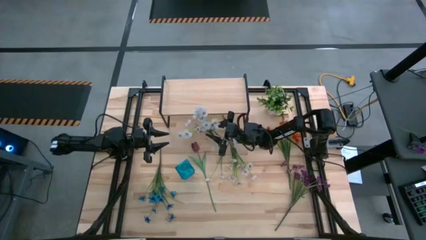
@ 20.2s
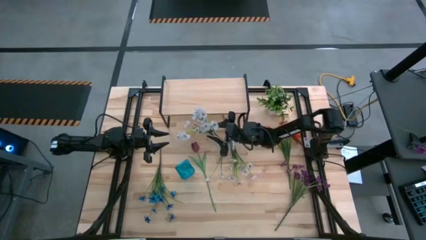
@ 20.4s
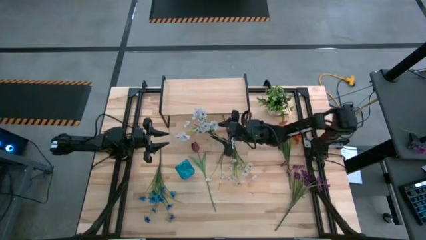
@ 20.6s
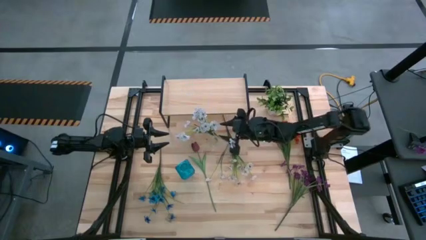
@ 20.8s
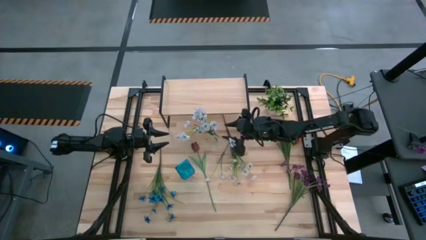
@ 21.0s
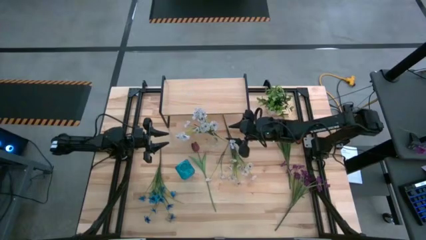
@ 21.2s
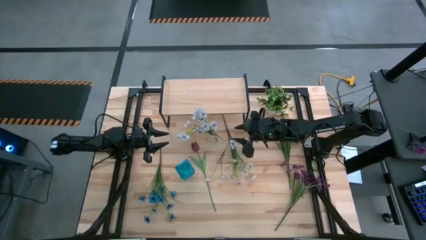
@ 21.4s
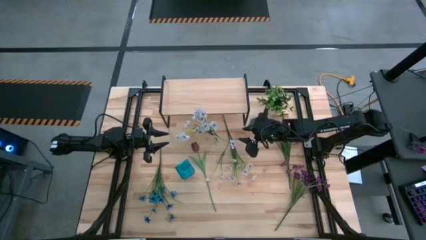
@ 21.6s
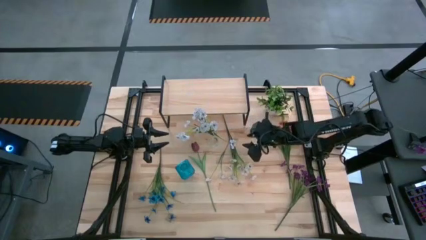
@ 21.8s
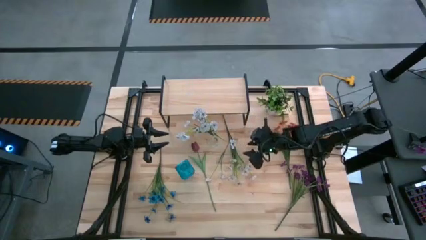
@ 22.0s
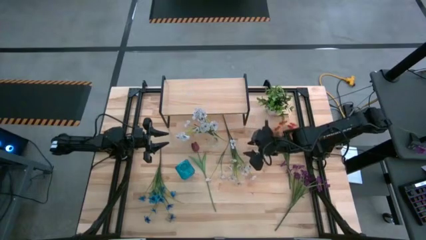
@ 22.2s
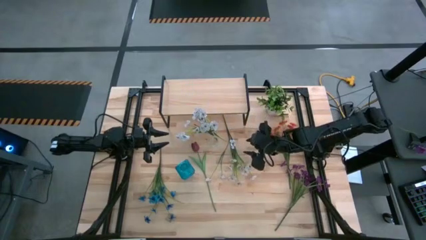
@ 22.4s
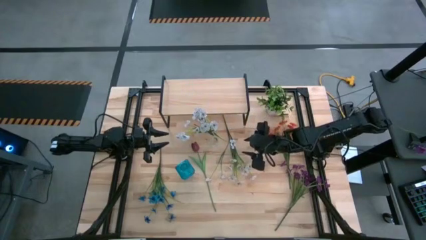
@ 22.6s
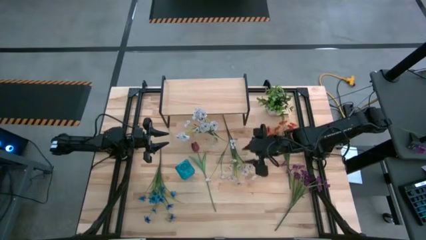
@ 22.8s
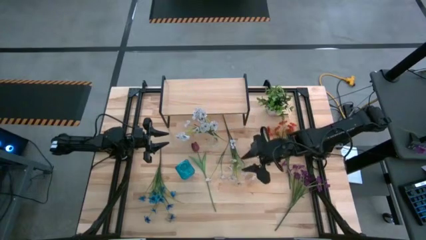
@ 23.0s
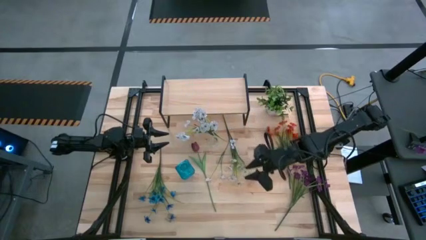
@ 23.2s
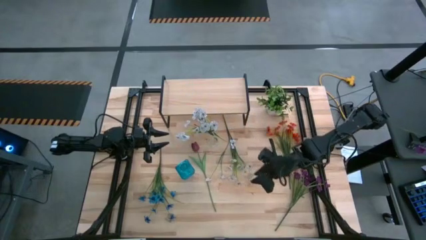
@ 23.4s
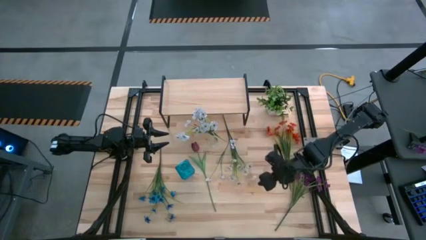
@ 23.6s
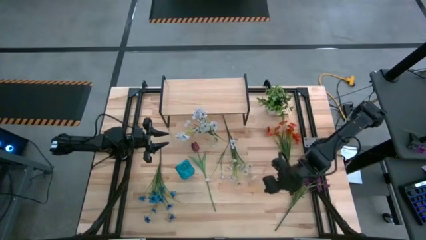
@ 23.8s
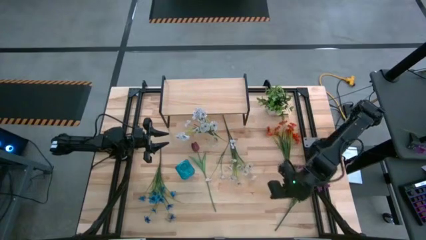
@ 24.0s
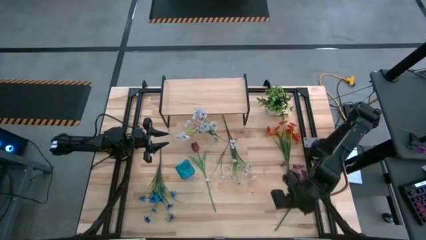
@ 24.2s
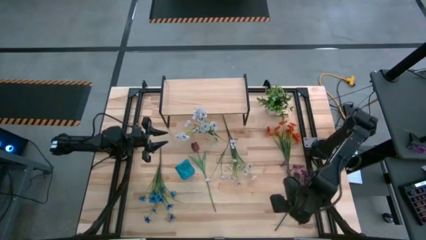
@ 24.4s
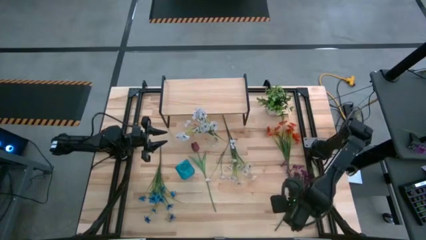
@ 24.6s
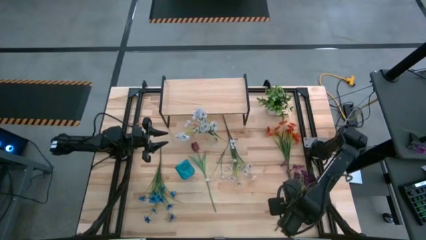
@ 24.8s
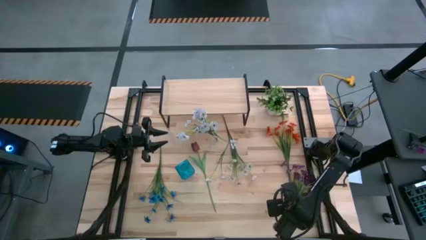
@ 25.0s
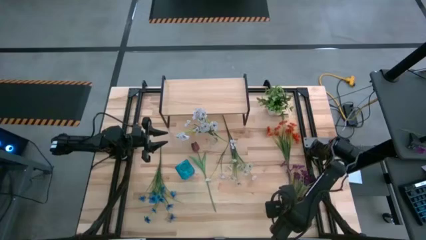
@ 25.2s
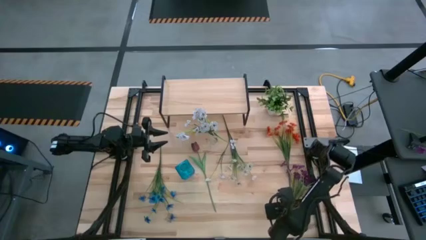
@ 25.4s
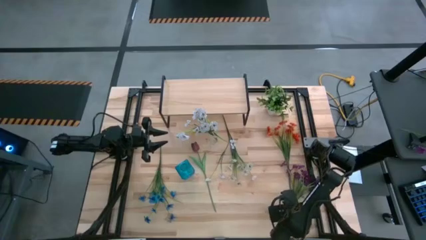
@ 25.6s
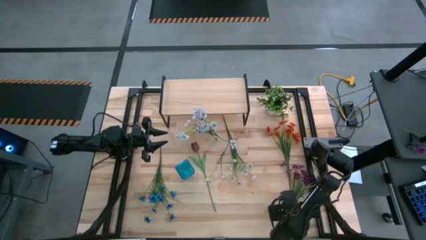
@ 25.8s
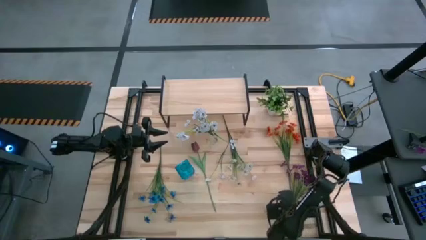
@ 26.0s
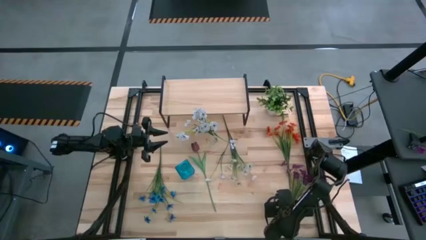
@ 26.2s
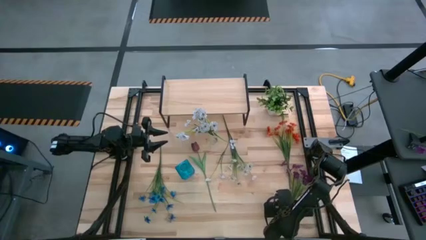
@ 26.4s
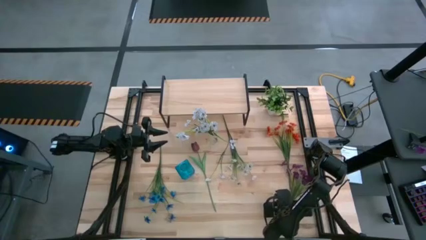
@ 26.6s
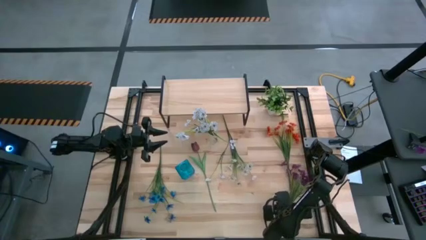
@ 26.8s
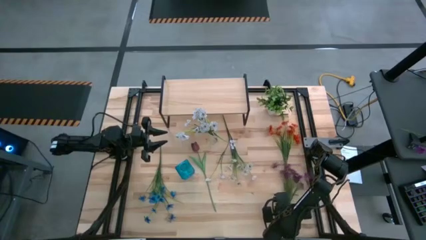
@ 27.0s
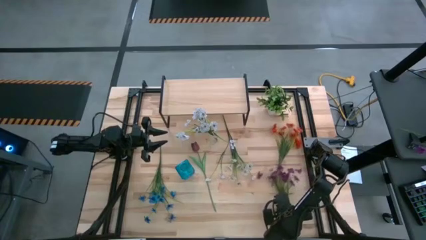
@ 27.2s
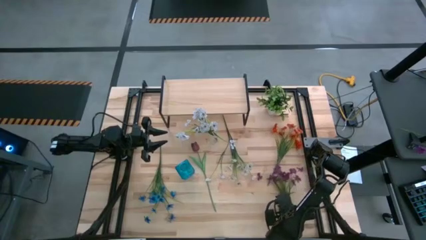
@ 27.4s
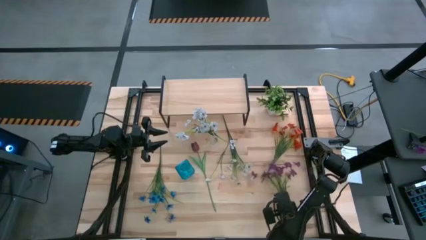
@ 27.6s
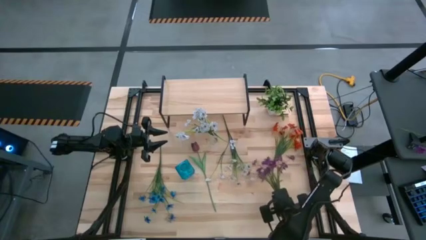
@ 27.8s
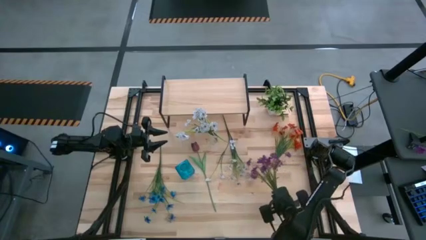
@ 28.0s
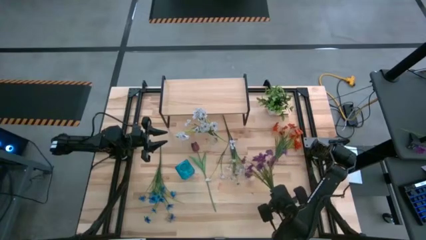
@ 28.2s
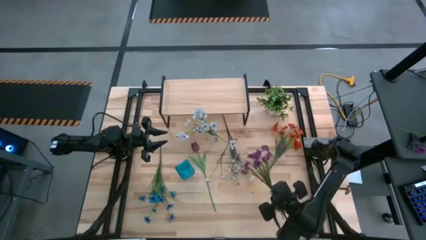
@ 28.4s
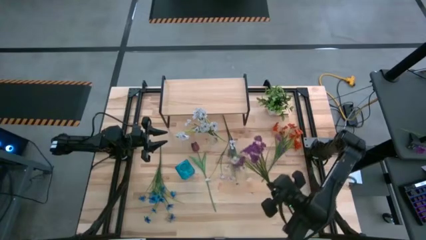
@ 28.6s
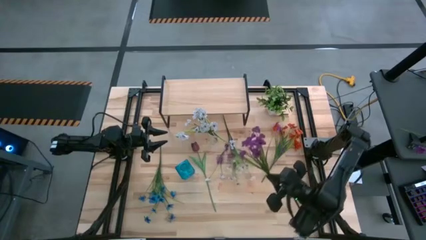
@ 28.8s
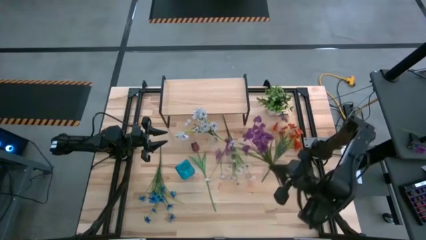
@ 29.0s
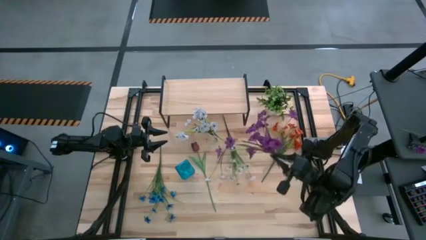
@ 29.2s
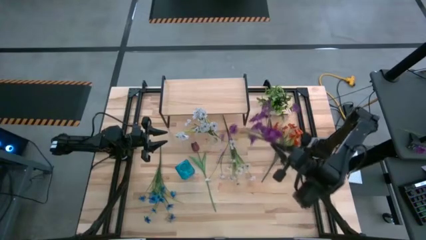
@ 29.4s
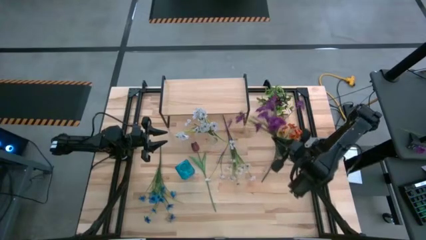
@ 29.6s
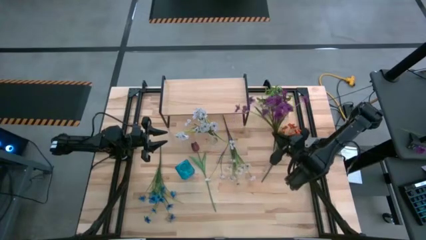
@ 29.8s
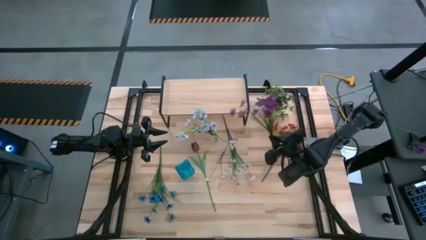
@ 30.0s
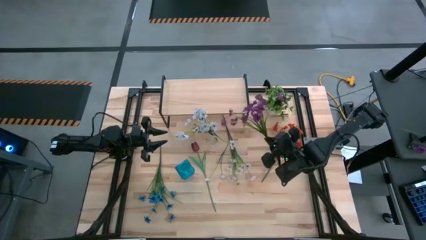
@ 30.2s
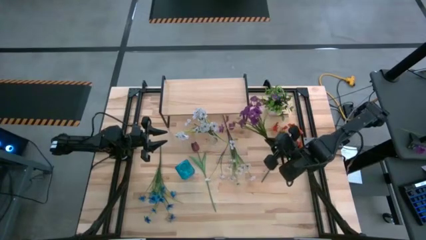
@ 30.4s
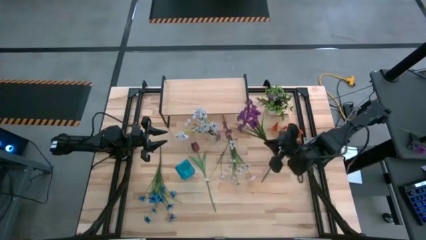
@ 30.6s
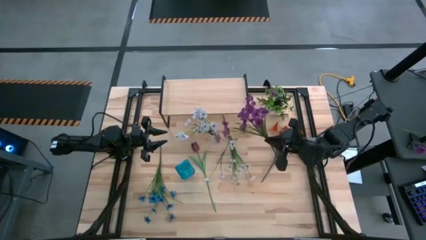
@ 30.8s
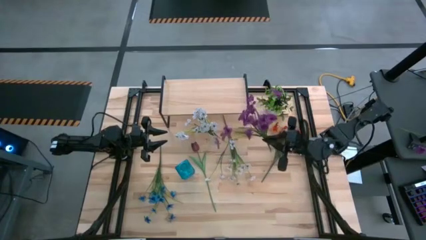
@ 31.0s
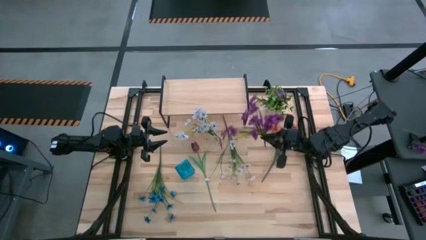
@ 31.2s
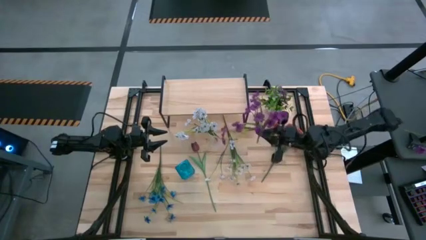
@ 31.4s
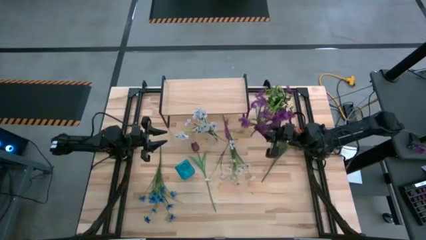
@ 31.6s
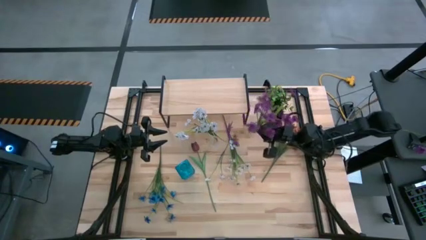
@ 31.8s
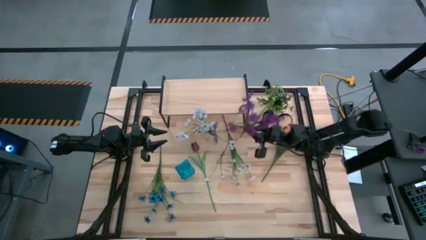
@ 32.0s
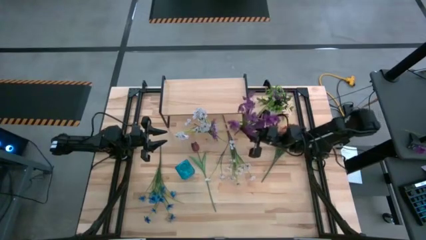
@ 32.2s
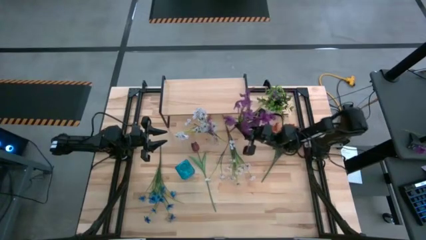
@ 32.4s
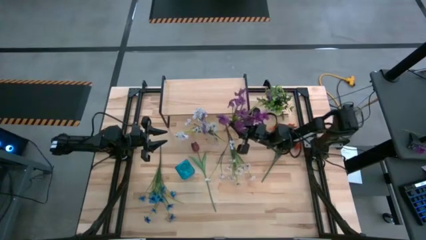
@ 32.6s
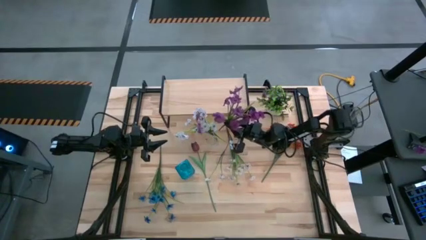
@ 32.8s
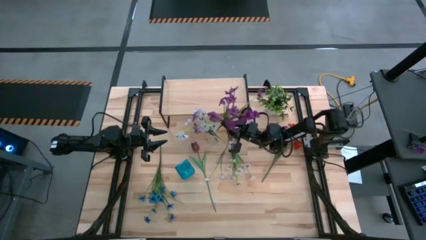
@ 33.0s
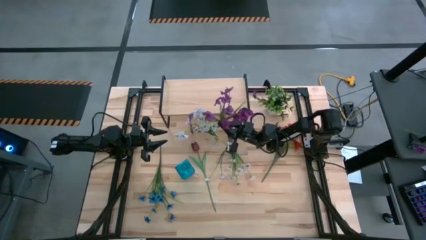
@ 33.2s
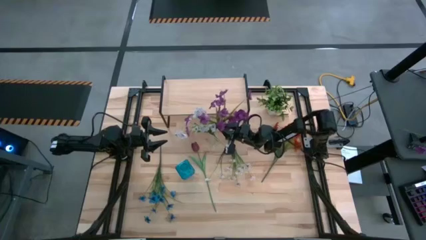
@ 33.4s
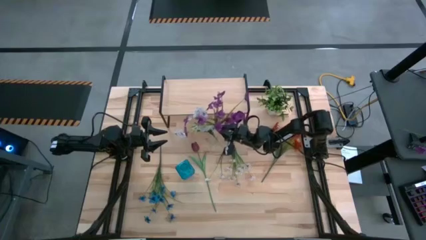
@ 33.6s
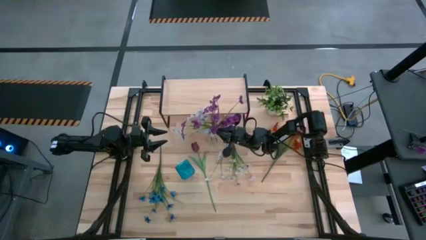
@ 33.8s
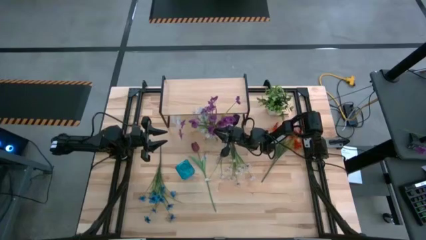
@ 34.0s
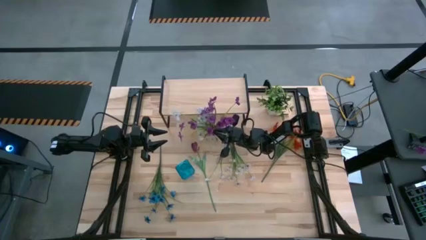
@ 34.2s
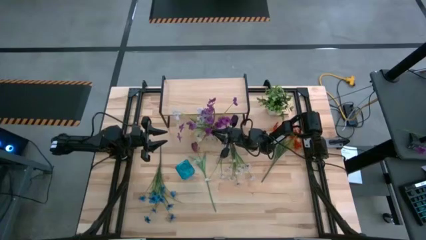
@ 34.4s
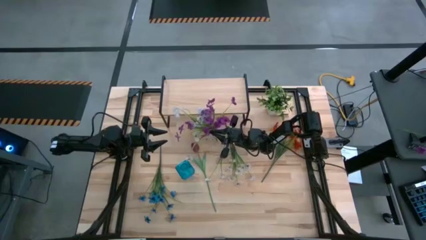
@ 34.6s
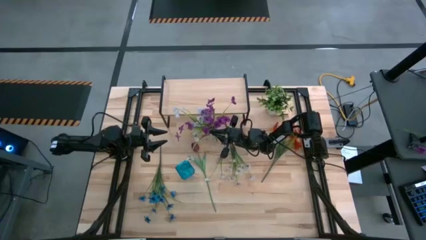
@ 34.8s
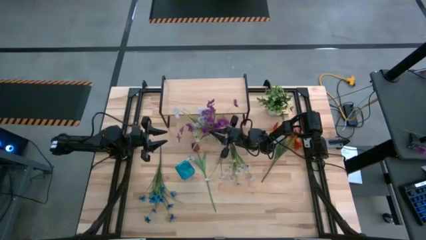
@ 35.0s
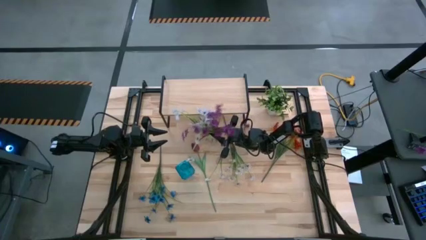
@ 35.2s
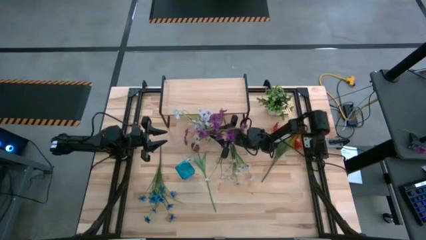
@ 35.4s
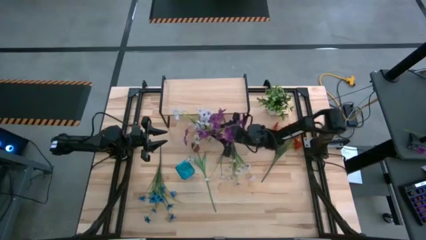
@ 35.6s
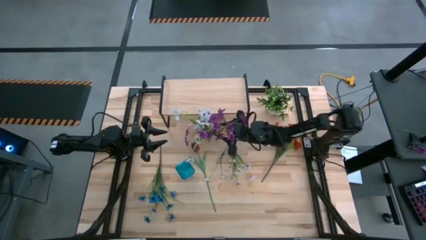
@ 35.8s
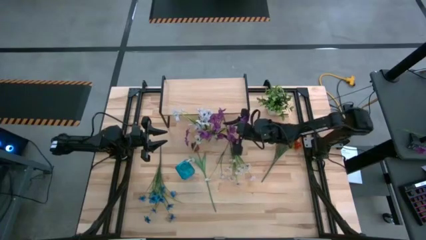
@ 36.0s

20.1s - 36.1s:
Task: Pick and place flowers into a vace then onto a shelf
Put the purple flowers into the transparent vase
